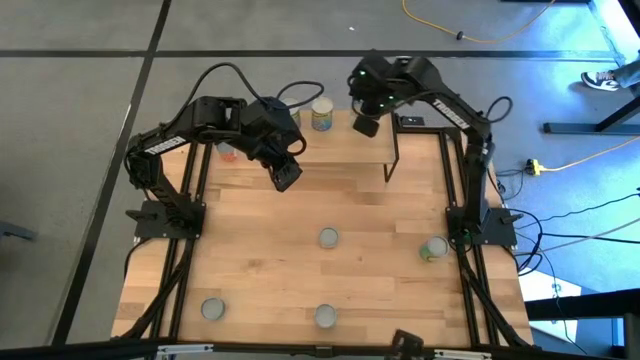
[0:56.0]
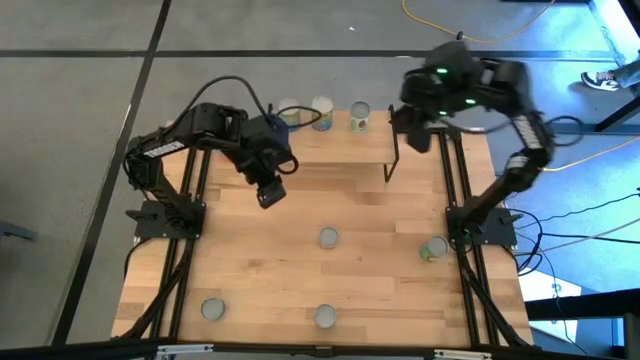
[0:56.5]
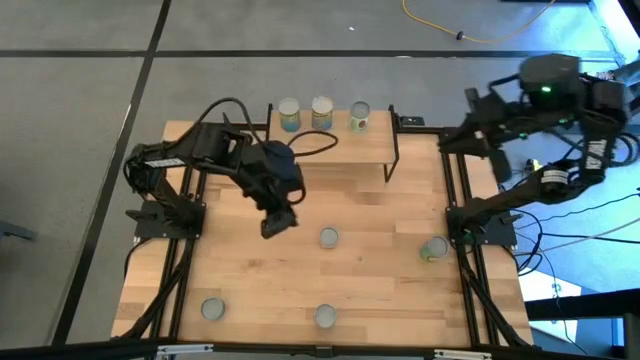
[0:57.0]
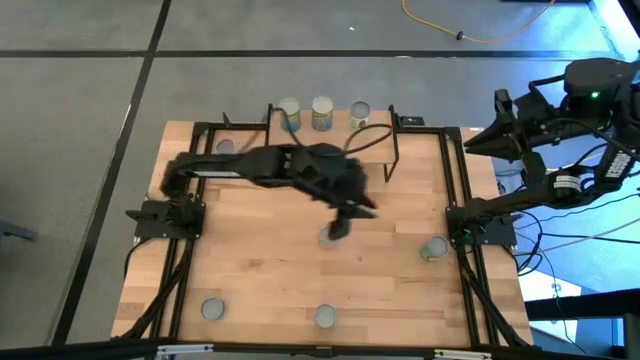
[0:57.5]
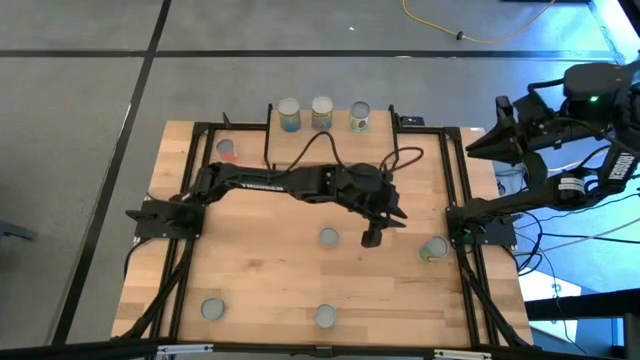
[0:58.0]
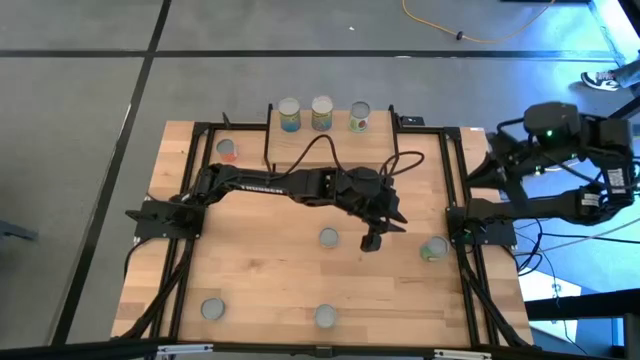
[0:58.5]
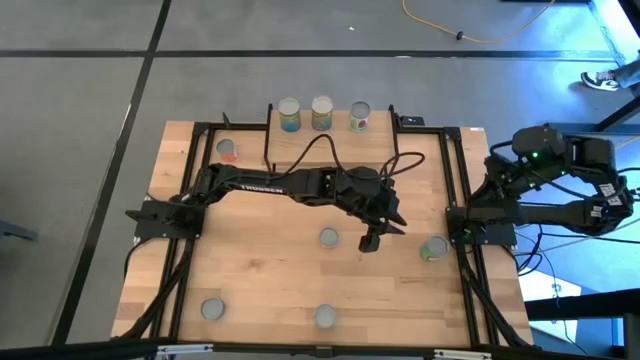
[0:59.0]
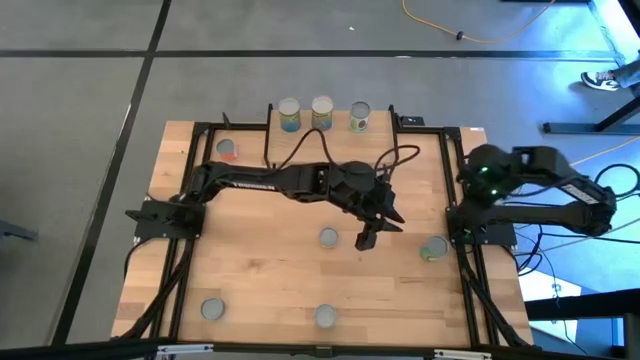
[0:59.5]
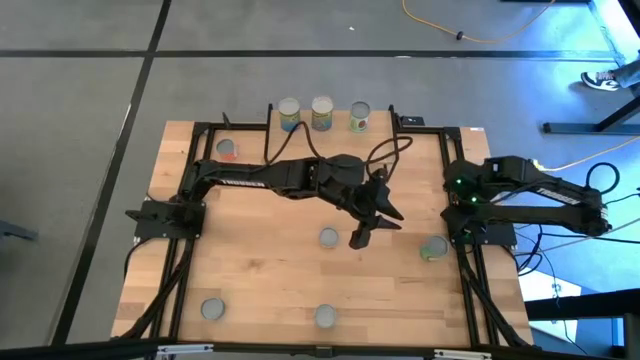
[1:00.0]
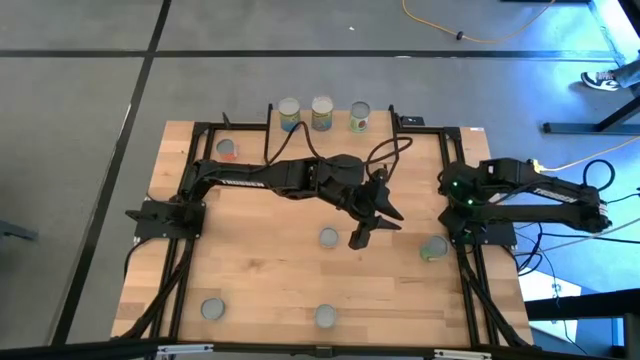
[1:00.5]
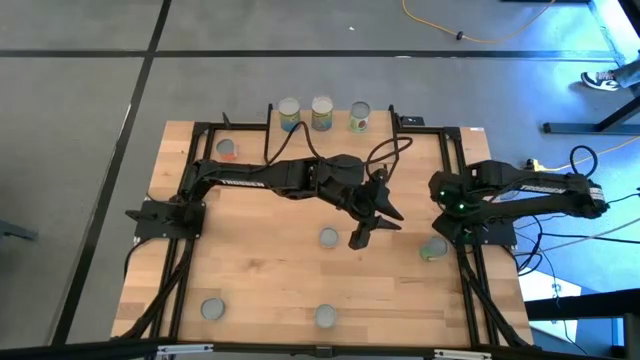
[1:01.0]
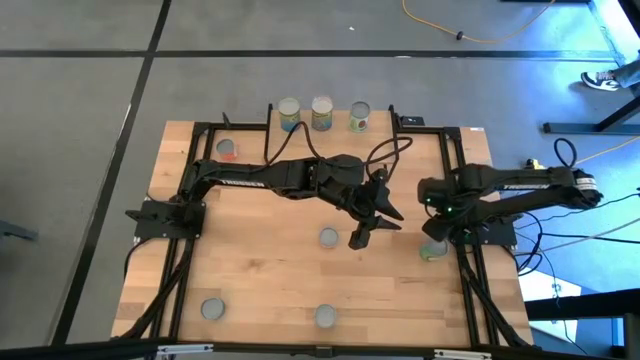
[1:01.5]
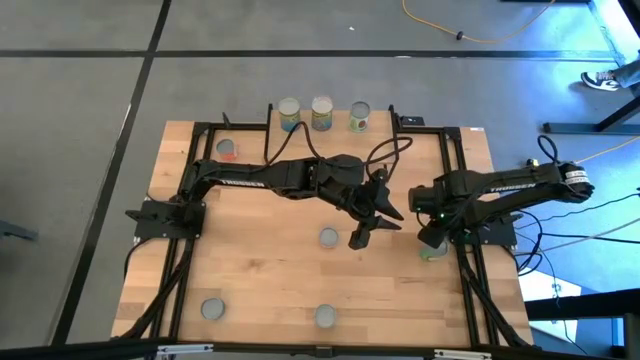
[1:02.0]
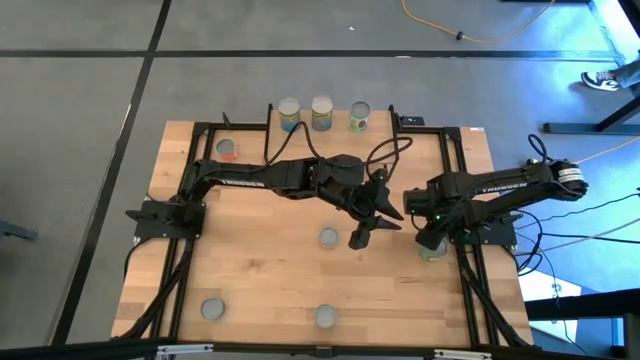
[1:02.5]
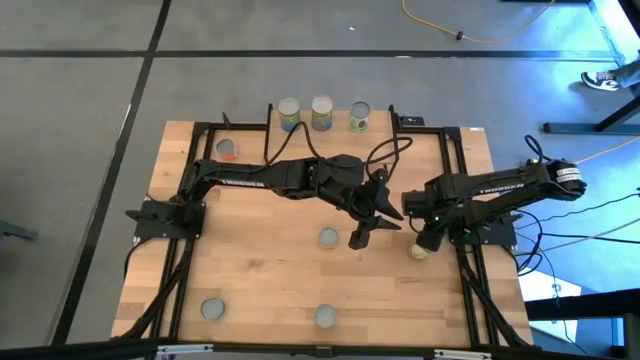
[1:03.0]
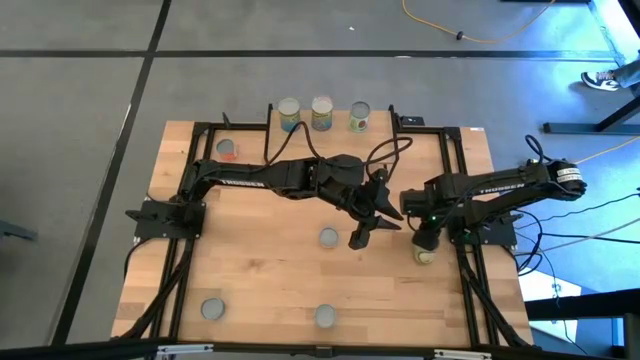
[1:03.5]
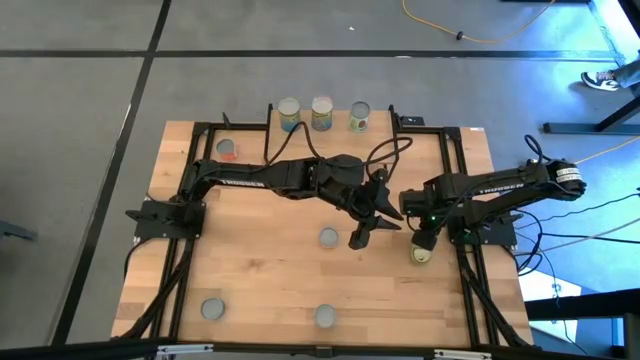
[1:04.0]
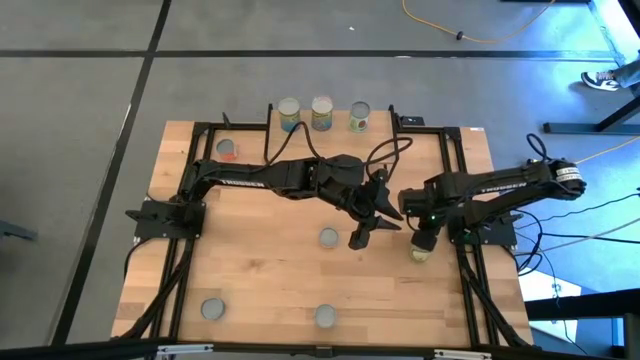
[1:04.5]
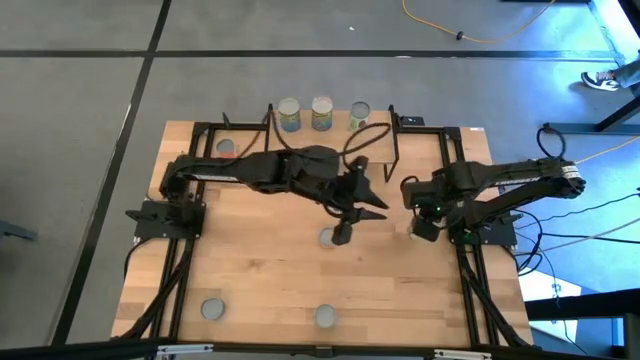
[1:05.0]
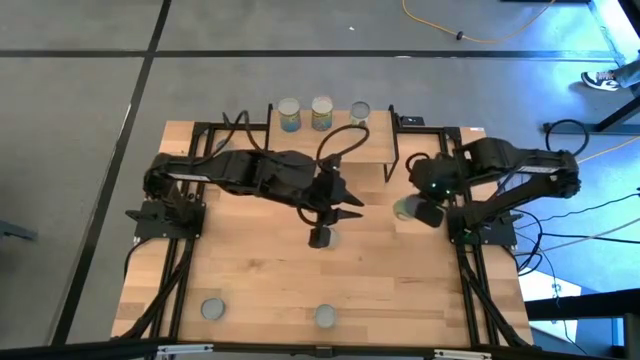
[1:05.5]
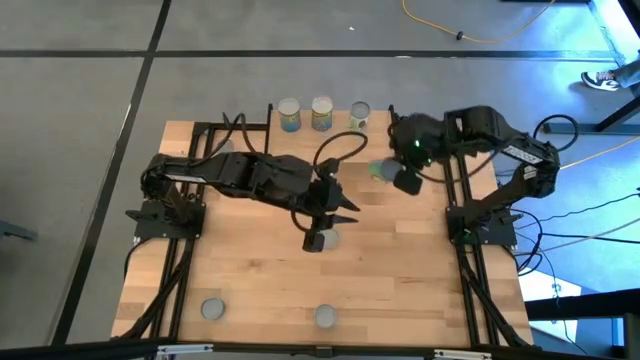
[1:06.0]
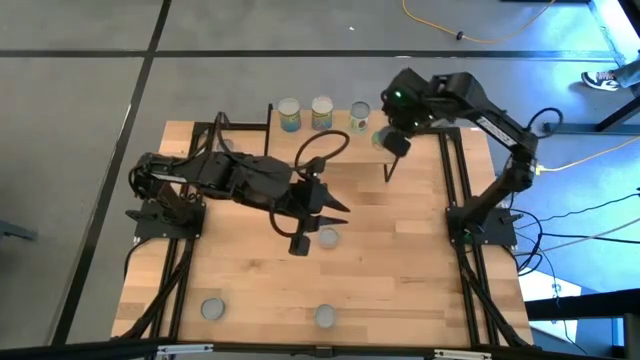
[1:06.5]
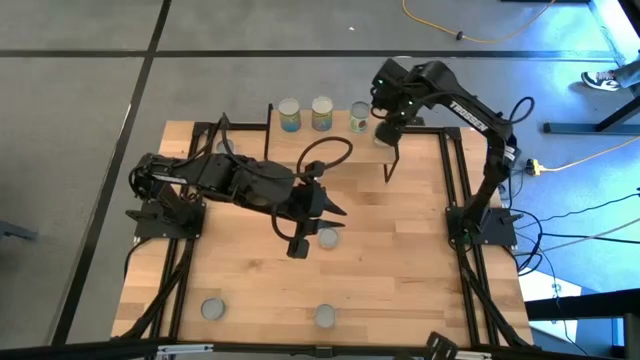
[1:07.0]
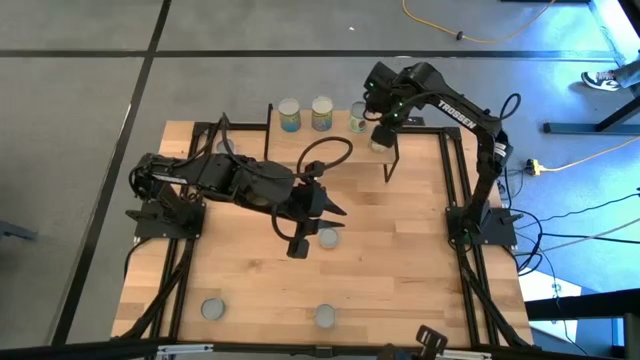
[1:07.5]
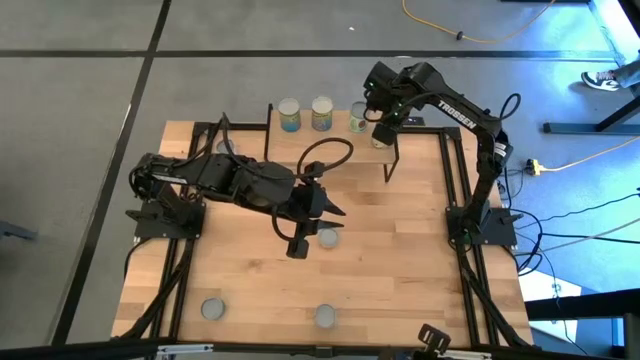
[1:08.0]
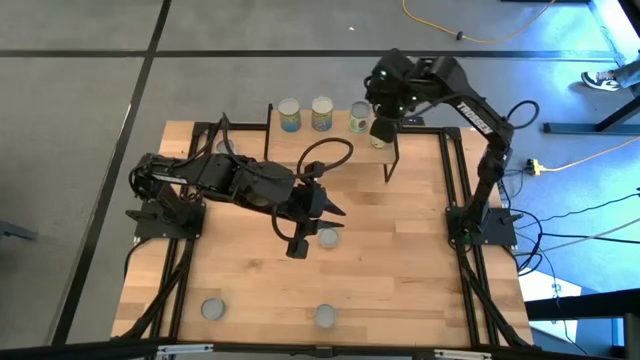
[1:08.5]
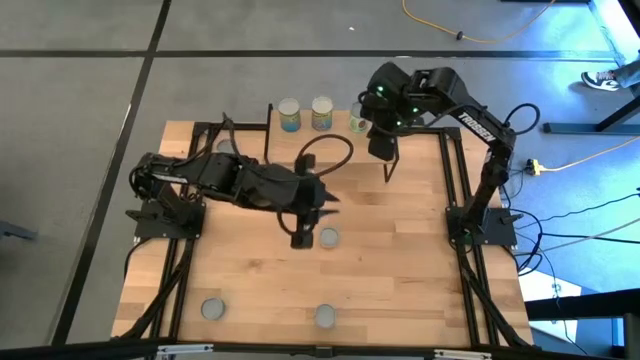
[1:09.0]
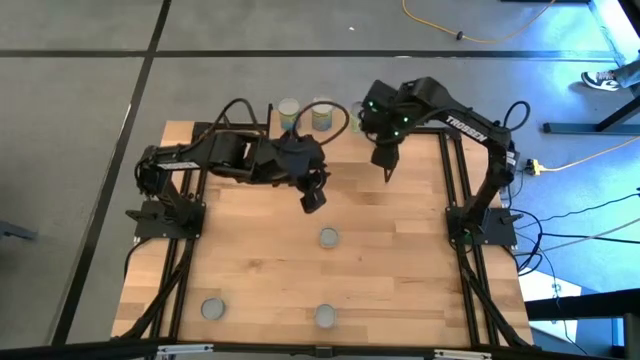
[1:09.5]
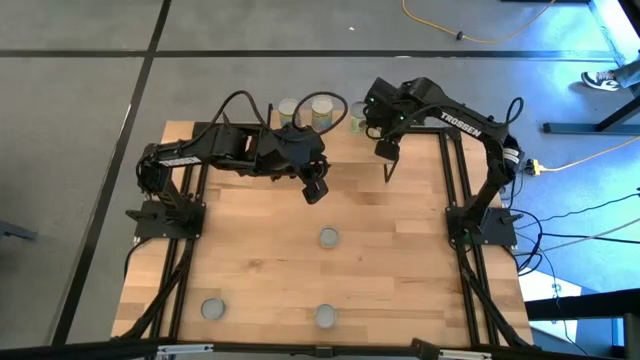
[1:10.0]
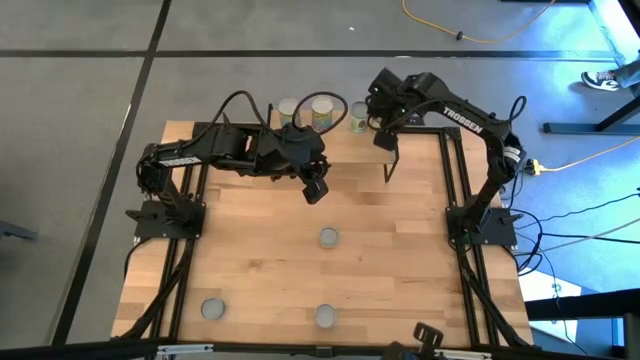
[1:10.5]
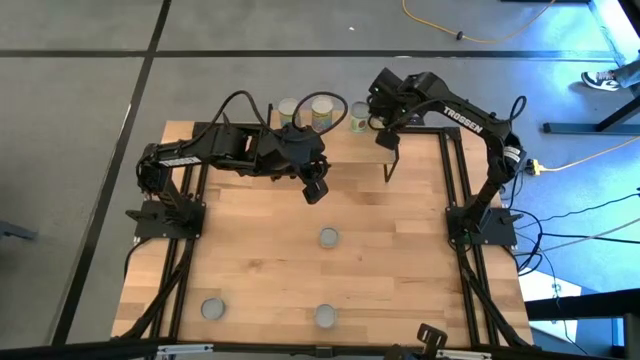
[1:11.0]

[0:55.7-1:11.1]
Task: Pick and place cans onto a shelf
Put the canned chicken soup on the shelf

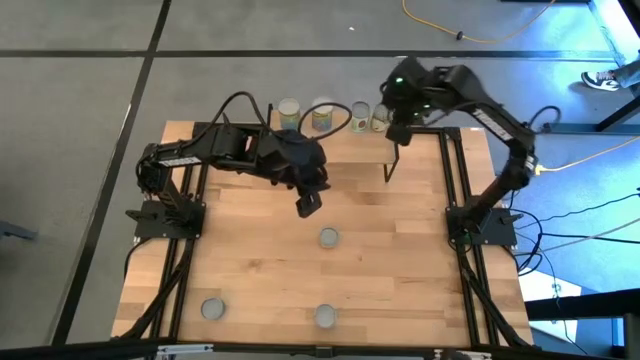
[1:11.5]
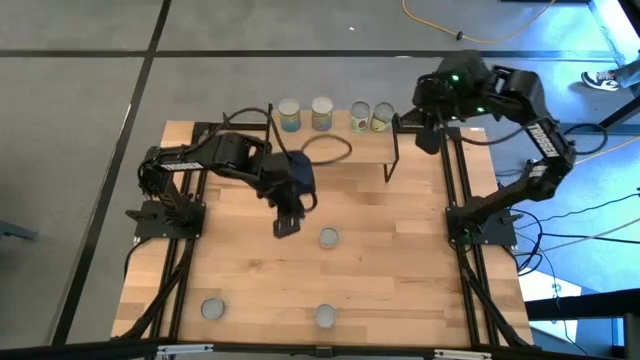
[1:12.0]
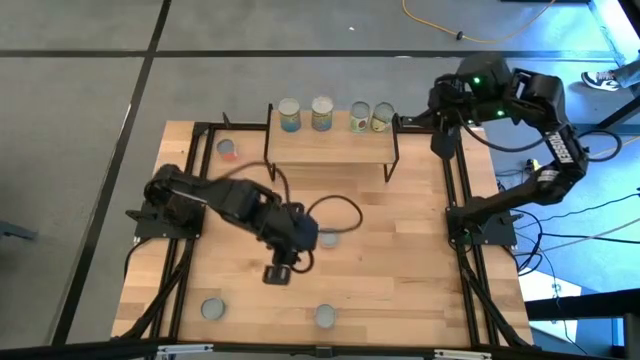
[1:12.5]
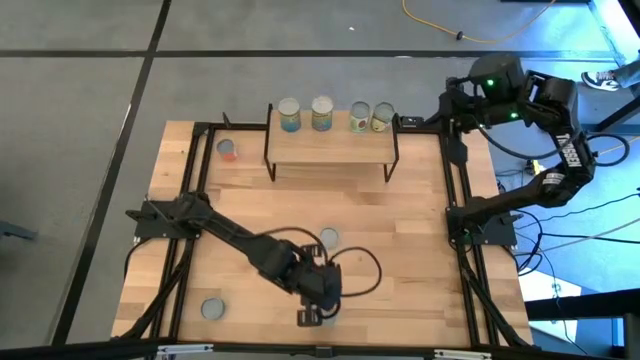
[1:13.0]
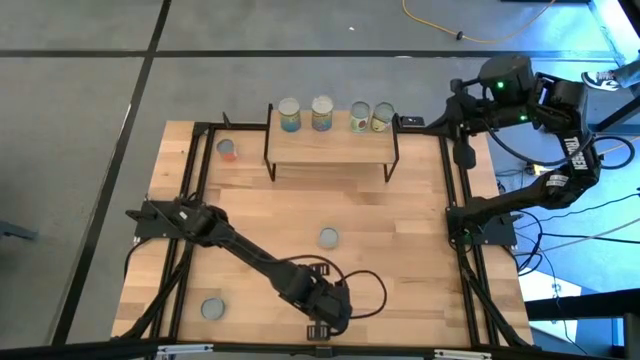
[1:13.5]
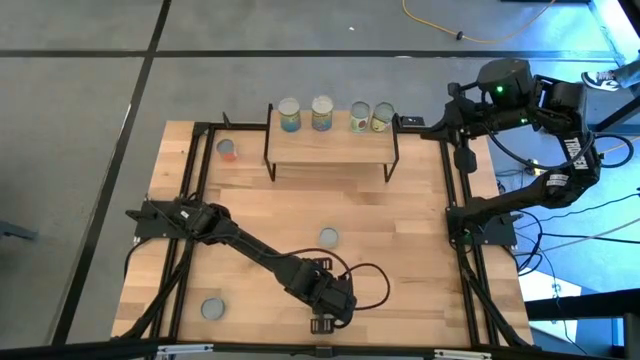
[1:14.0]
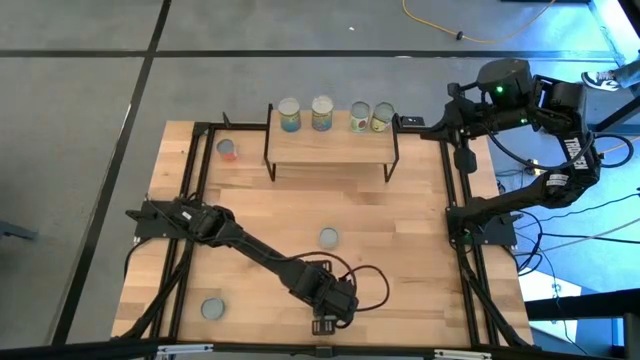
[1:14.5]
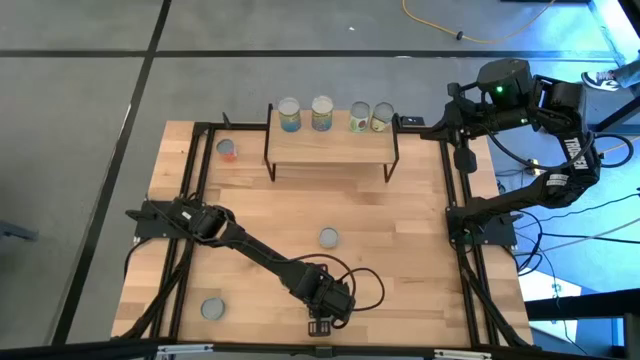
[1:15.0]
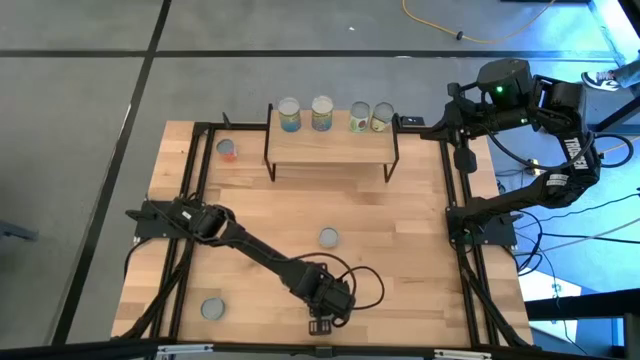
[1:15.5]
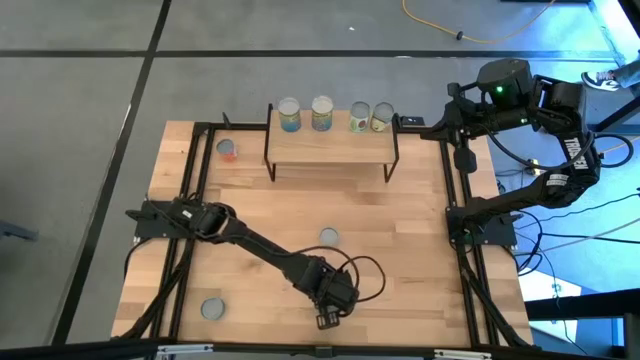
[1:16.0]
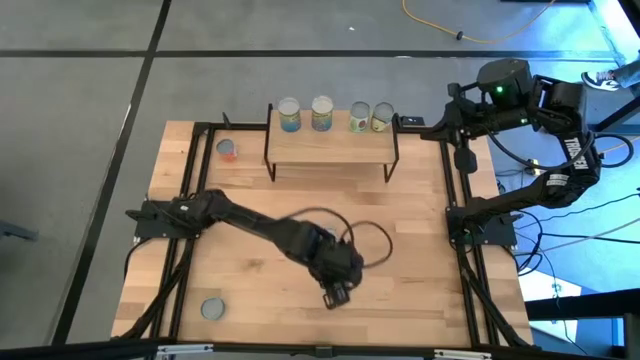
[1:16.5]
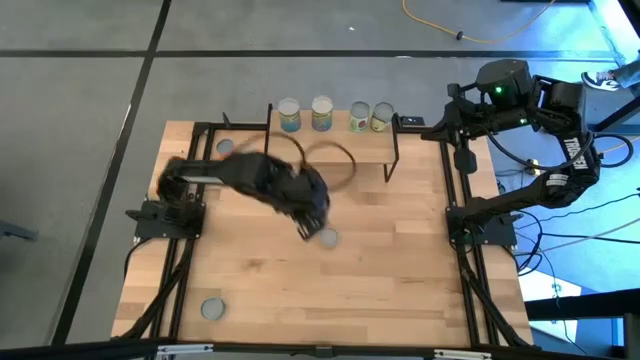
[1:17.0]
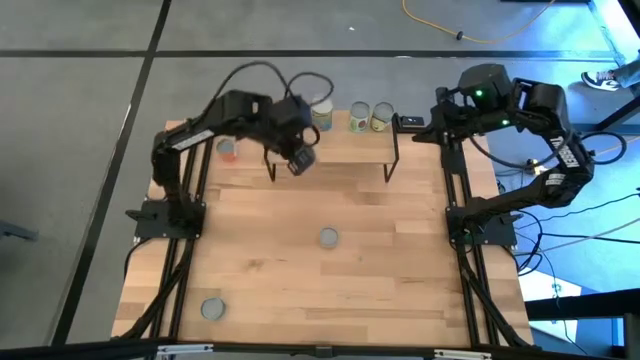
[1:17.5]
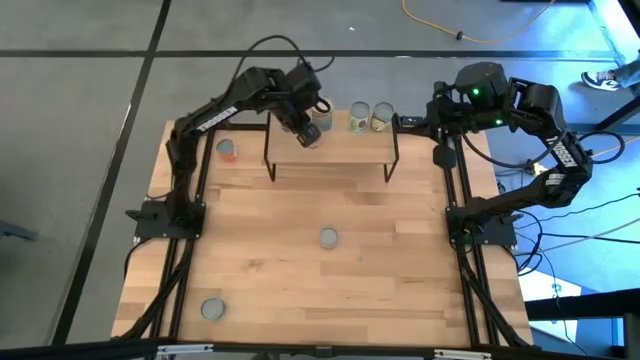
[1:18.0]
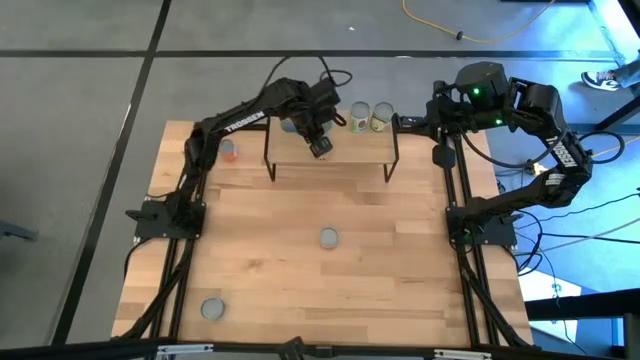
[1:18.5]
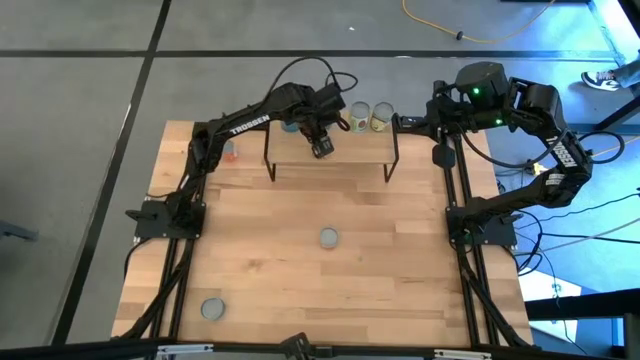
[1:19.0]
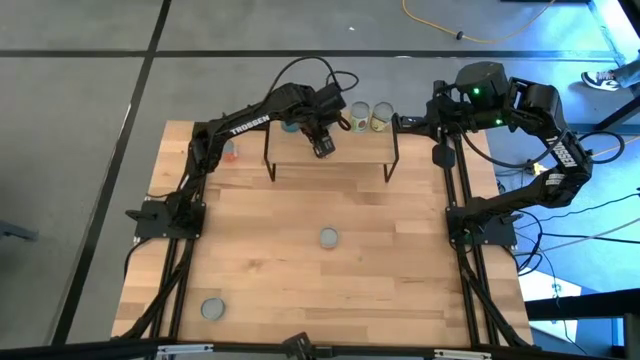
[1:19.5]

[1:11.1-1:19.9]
Put the canned beans on the shelf
